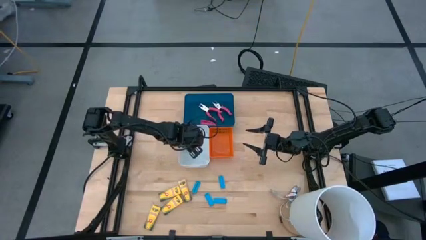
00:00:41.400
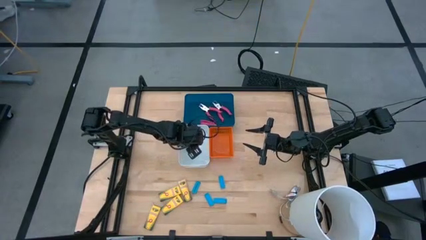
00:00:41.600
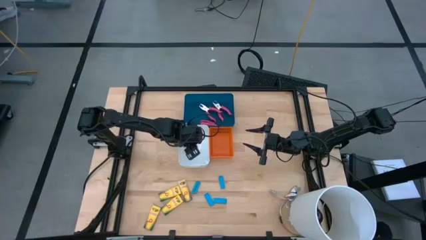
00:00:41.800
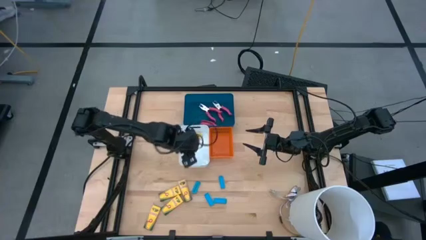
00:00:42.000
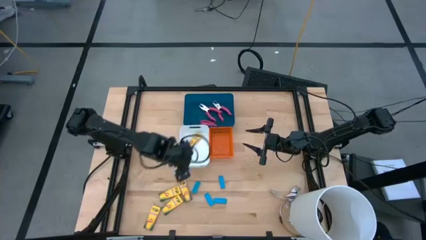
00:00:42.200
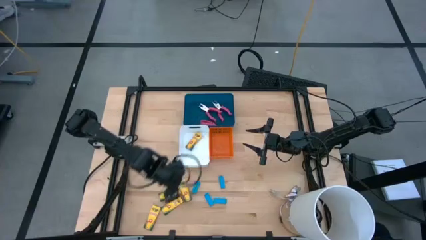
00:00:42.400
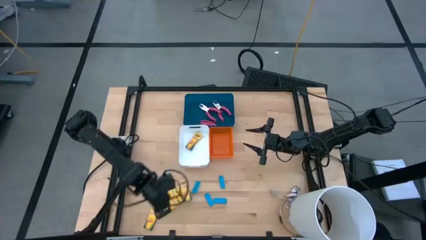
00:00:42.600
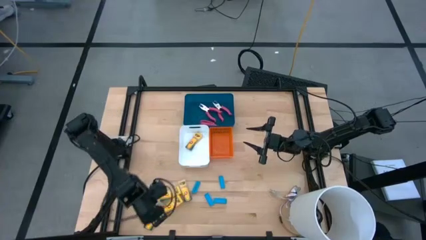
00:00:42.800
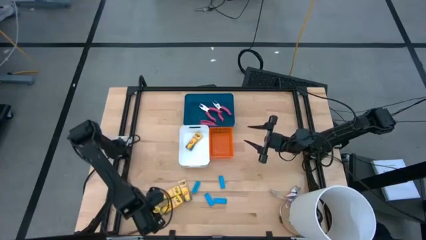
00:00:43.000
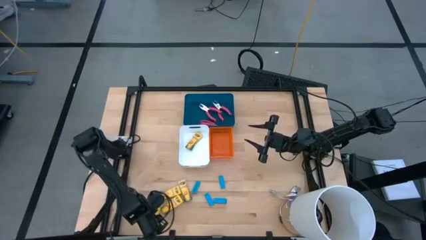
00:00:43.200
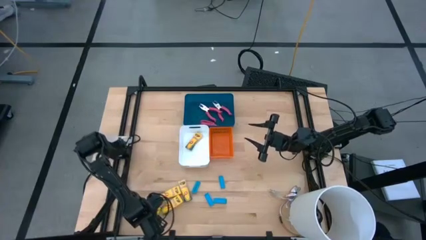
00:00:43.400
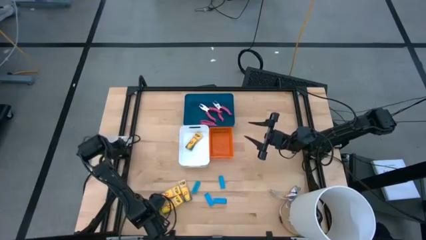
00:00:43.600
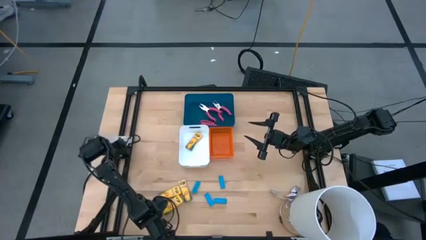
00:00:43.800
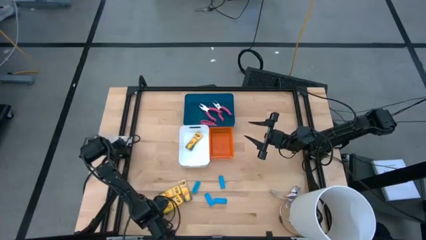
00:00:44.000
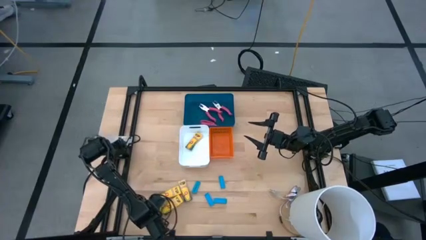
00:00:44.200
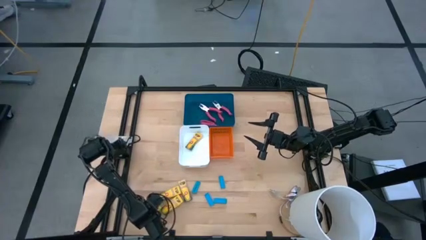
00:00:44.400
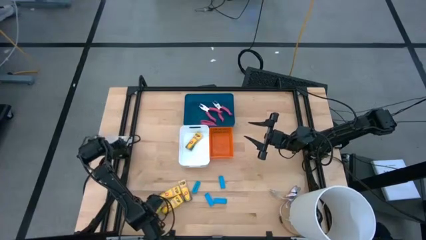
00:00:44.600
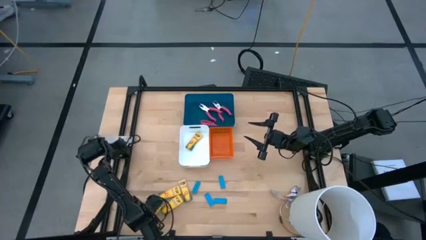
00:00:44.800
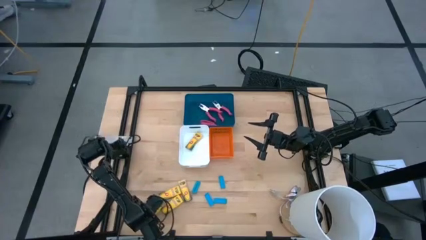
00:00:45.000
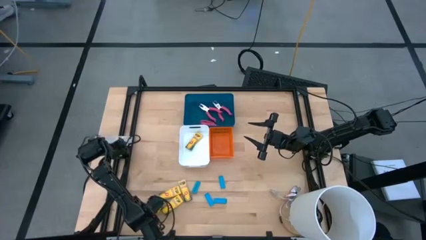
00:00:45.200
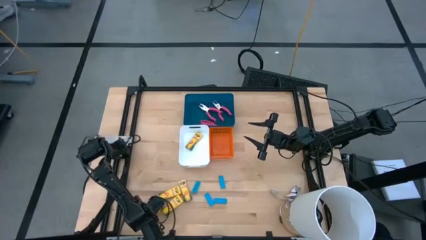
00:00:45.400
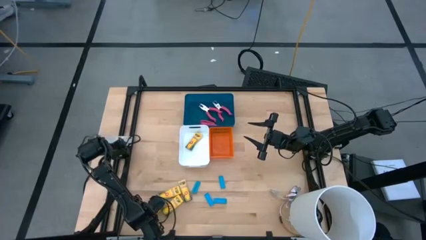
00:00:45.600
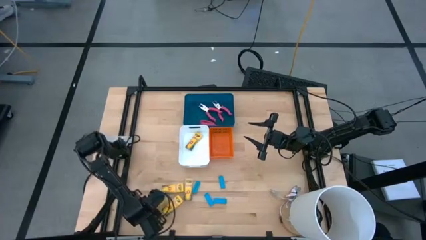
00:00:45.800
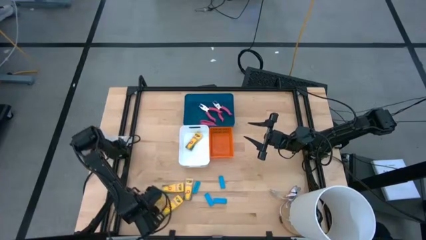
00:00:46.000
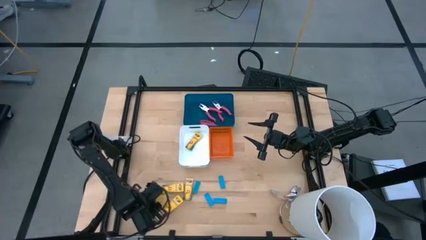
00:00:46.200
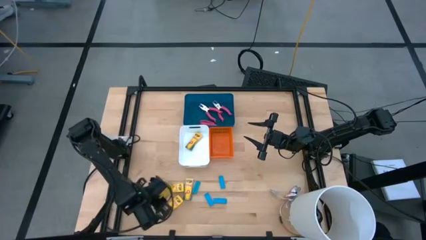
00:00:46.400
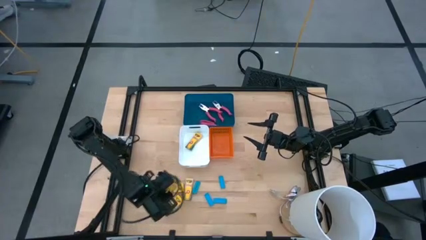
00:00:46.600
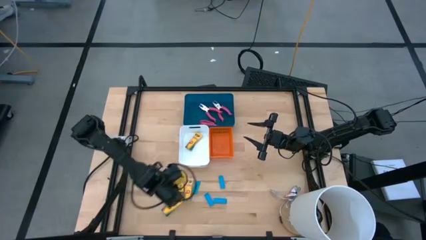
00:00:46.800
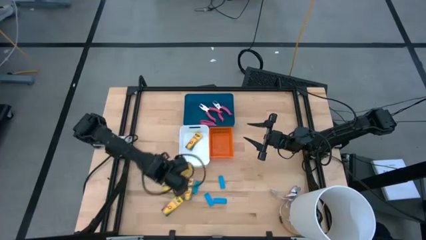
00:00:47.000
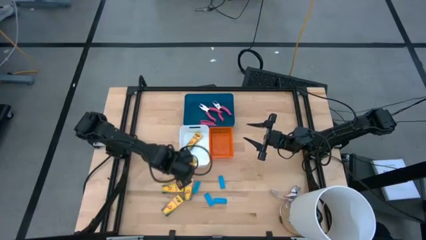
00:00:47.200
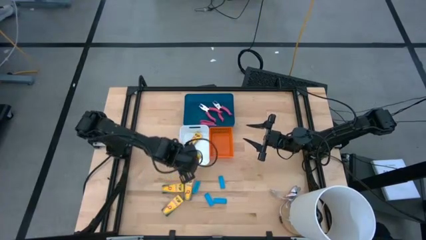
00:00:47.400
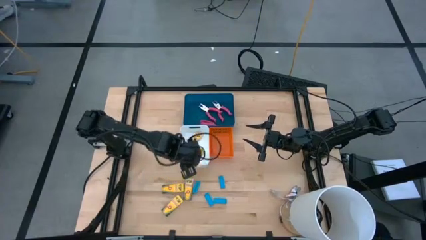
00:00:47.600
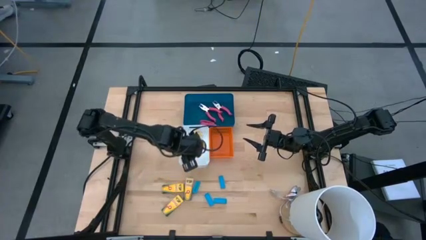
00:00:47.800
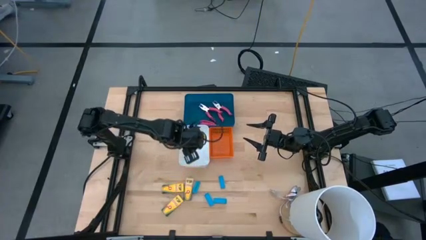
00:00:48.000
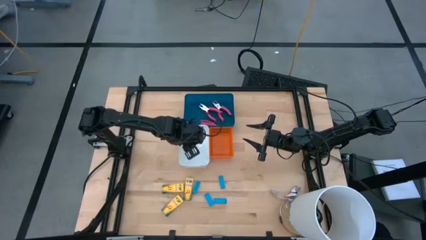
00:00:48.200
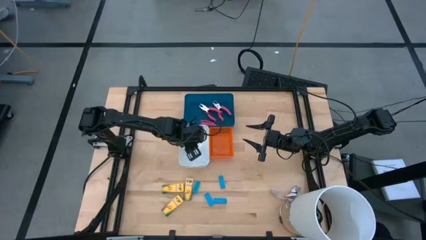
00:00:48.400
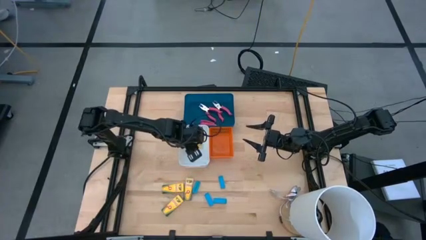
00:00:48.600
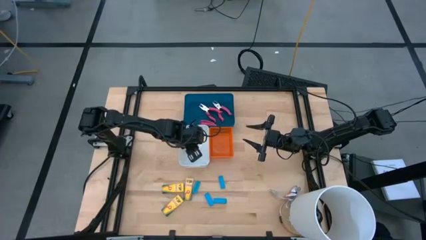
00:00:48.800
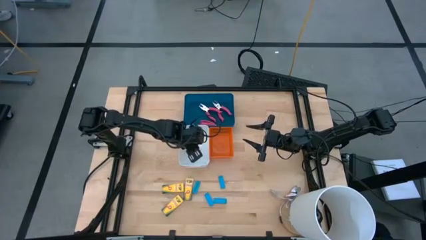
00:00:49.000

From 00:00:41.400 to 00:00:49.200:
Task: Pick & Place School Supplies
Put the yellow crayon box into the white bin

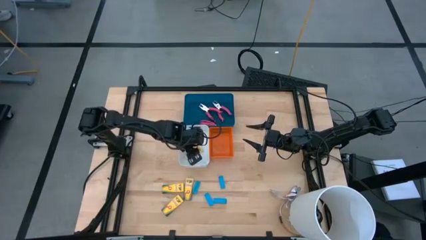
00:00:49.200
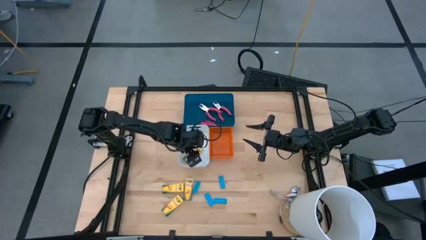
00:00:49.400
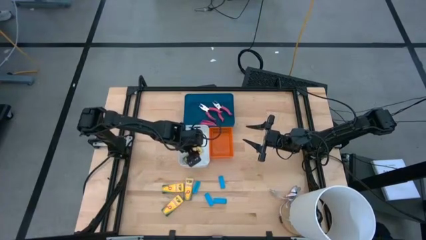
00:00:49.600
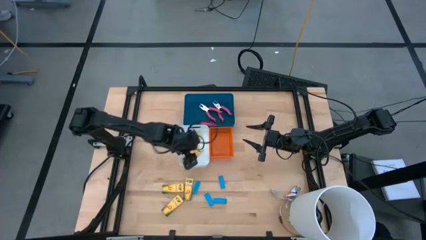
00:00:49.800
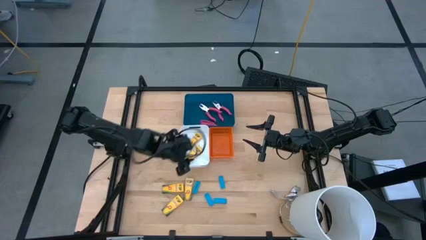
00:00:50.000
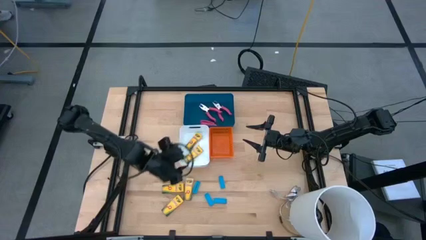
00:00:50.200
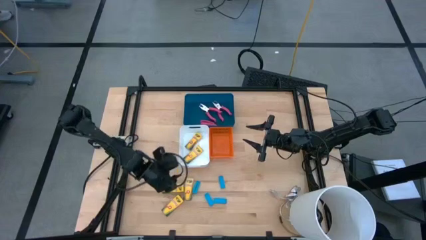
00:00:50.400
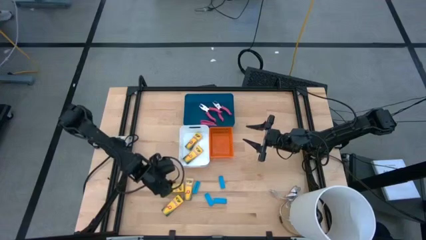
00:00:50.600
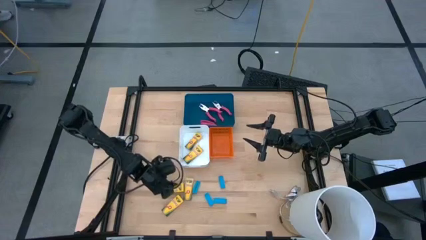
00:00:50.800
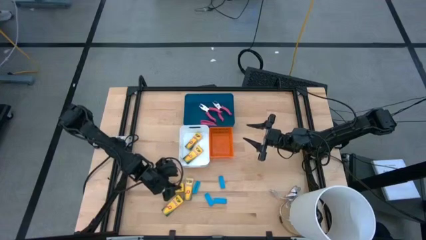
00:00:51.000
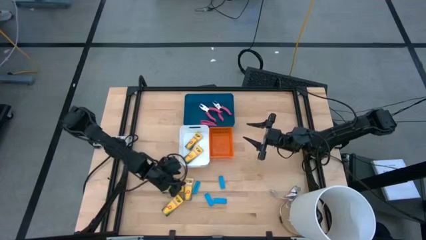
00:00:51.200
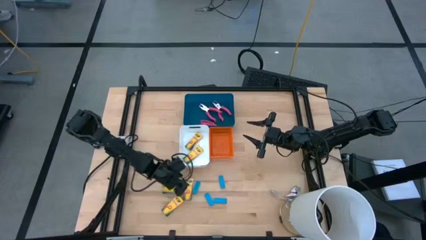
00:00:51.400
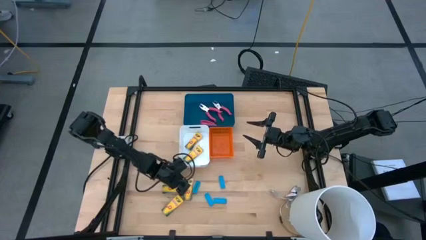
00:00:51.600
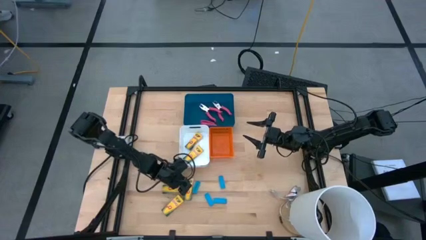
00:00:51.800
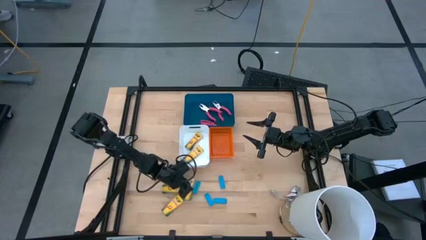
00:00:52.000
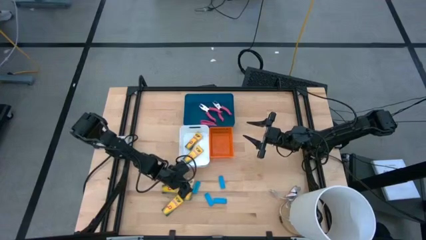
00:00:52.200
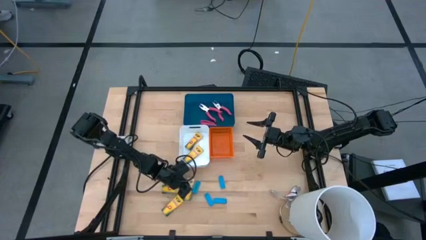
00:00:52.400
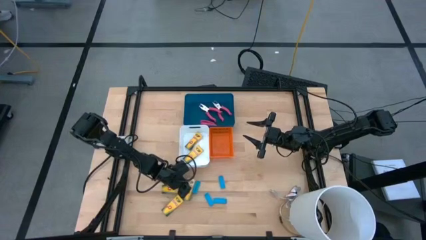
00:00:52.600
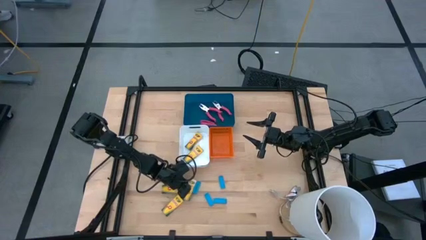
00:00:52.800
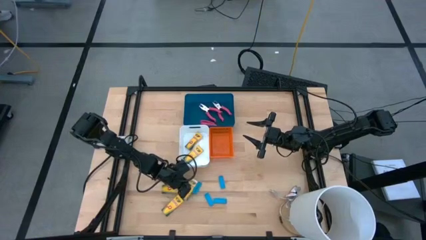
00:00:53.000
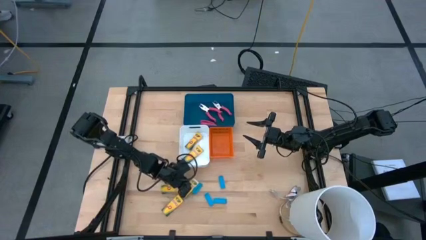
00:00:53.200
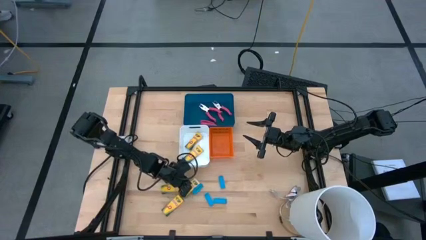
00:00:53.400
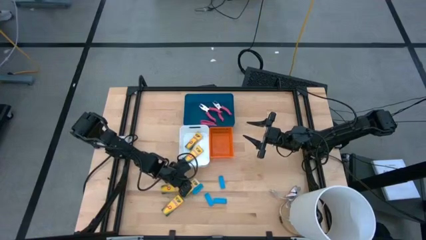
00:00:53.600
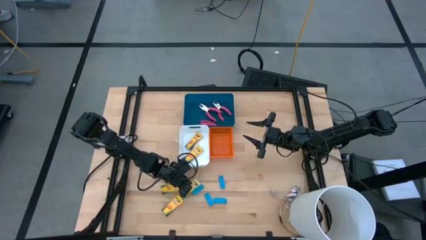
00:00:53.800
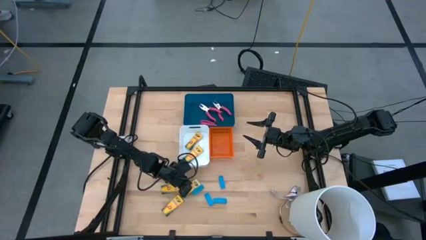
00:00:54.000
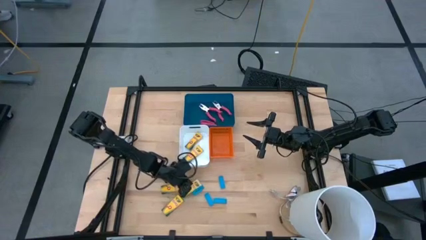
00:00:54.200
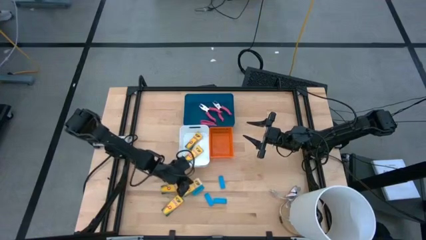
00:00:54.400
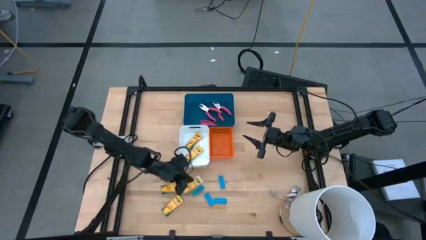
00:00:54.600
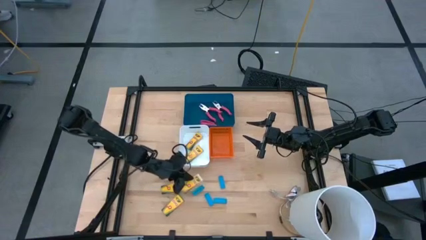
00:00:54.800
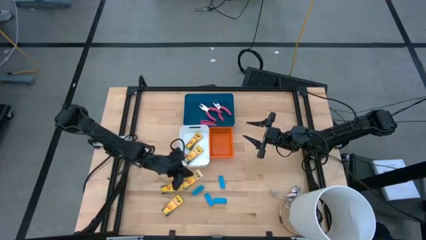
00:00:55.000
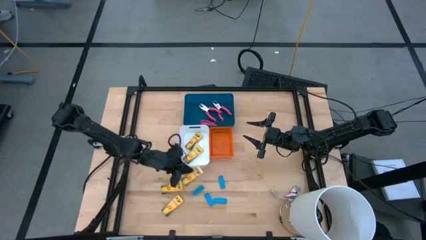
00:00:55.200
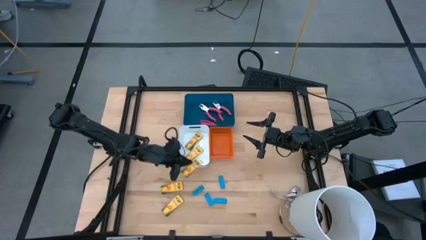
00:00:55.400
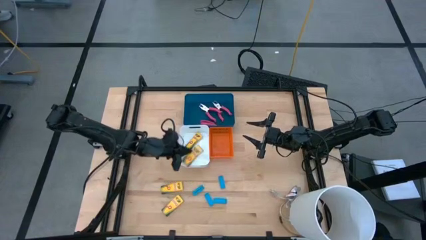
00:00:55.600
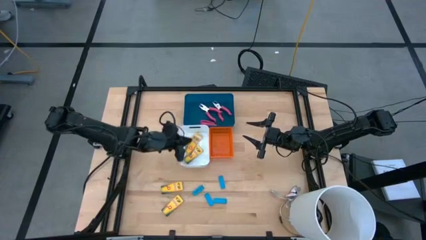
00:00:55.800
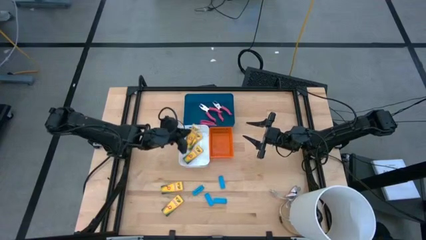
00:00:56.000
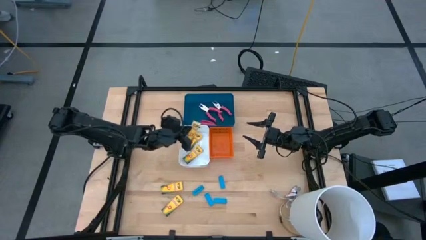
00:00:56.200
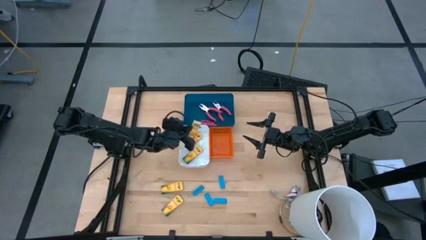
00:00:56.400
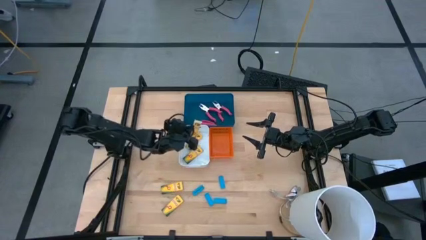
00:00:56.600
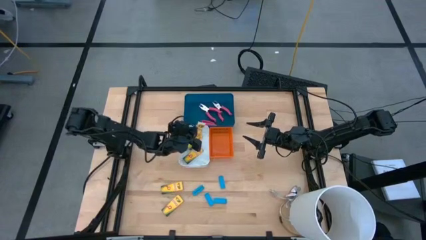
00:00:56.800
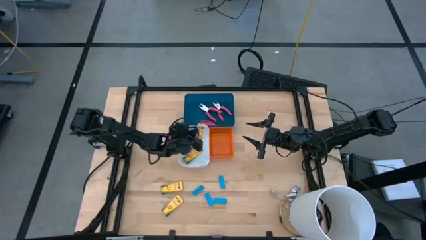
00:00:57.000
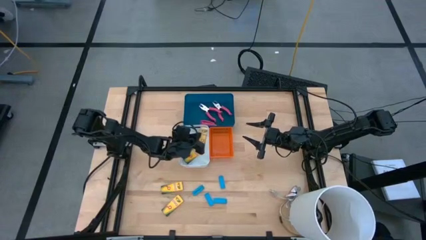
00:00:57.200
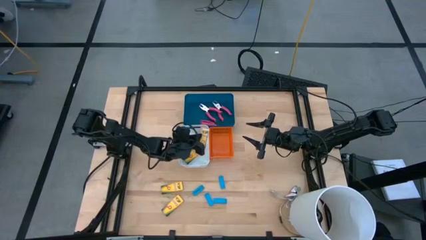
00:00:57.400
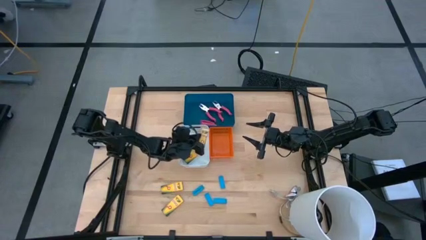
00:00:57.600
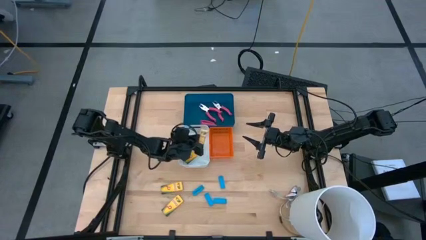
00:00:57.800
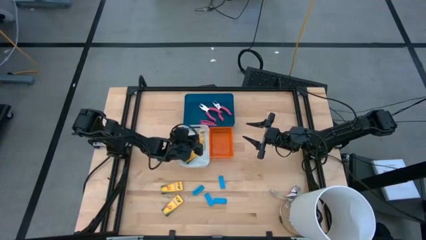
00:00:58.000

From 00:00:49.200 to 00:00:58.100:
Put the yellow crayon box into the white bin

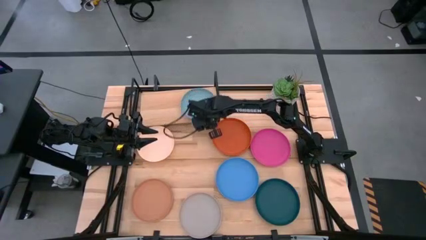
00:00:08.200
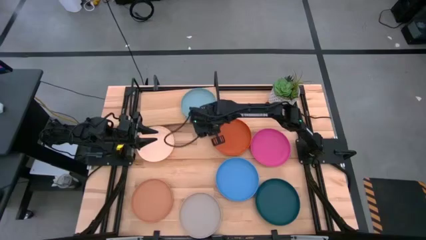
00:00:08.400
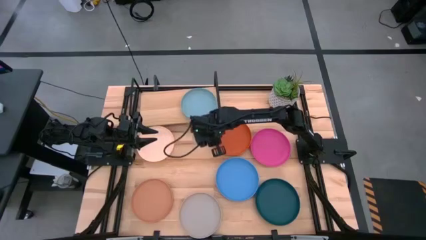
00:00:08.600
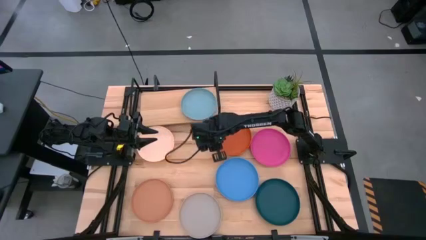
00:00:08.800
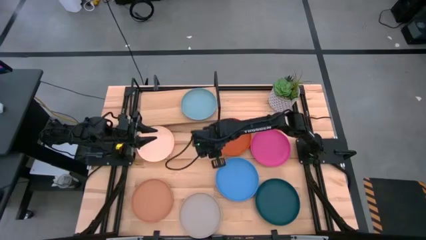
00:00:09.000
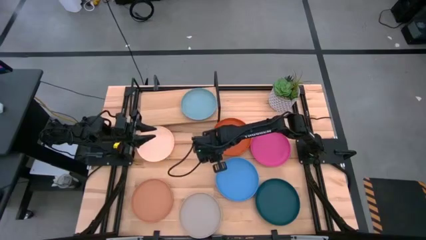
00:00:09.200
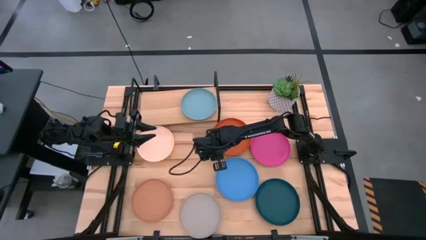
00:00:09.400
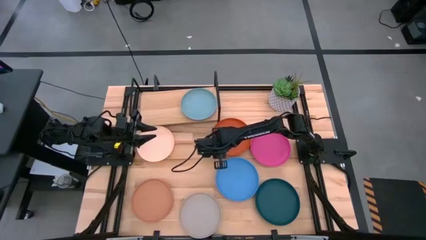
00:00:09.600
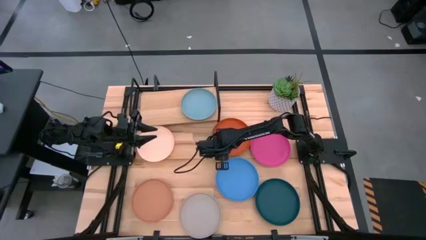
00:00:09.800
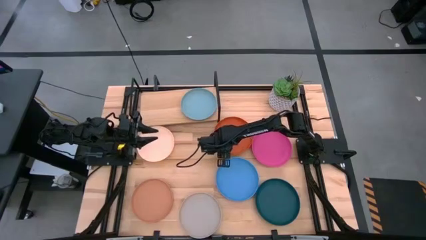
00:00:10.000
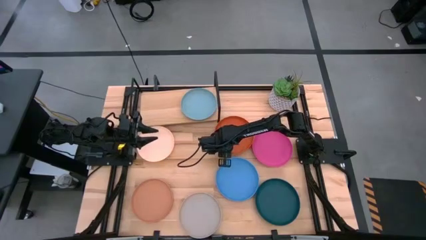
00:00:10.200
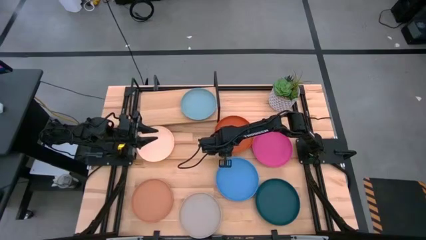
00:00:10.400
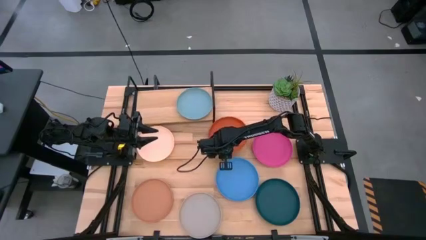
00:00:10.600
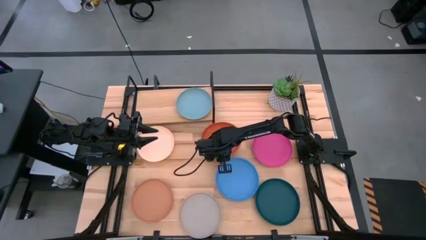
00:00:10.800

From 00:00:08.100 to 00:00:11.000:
Task: Place and stack plates onto a shelf
Put the orange plate on the shelf
